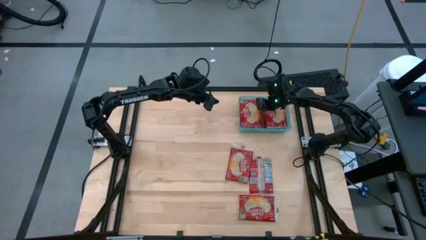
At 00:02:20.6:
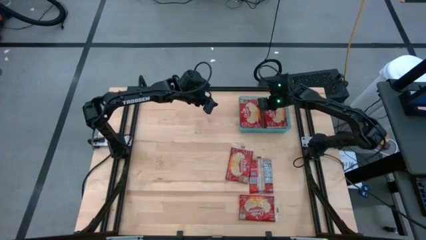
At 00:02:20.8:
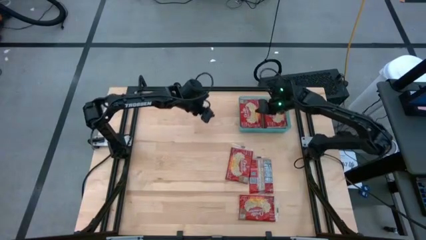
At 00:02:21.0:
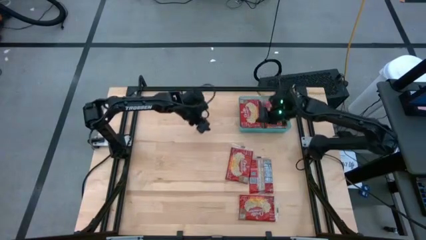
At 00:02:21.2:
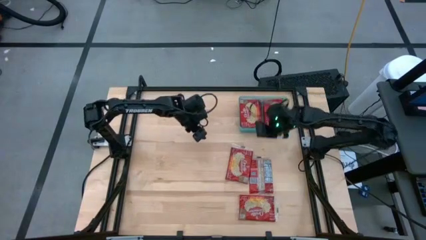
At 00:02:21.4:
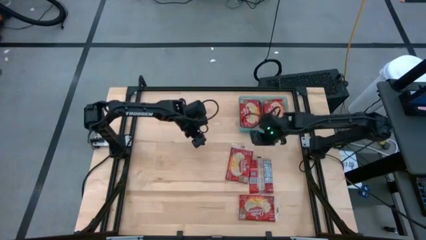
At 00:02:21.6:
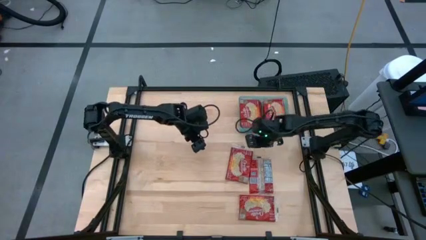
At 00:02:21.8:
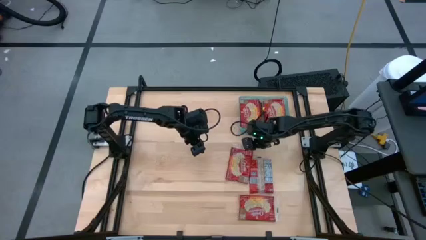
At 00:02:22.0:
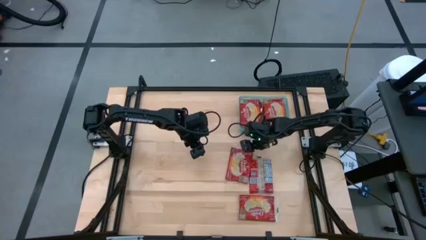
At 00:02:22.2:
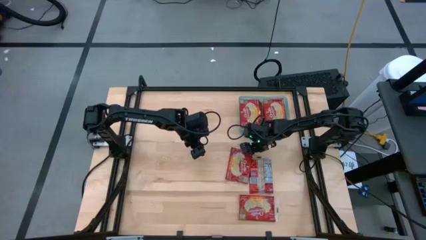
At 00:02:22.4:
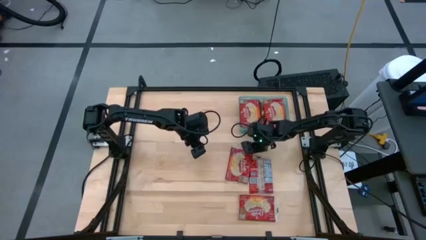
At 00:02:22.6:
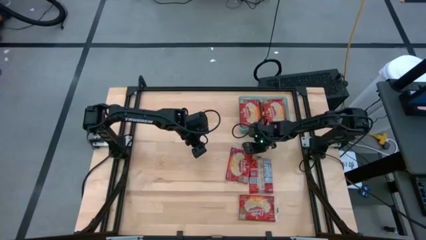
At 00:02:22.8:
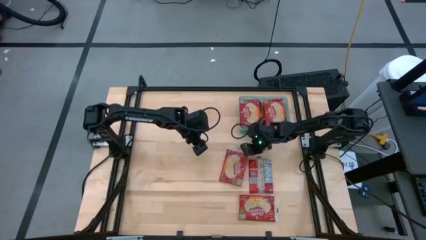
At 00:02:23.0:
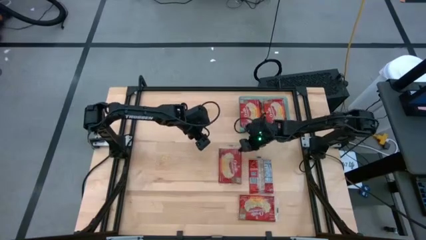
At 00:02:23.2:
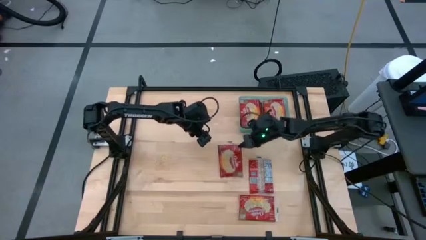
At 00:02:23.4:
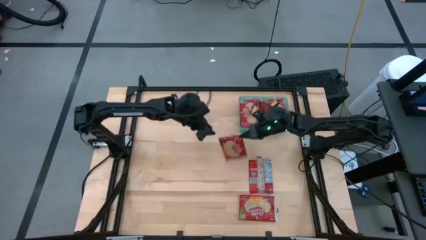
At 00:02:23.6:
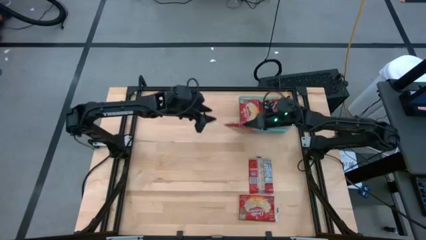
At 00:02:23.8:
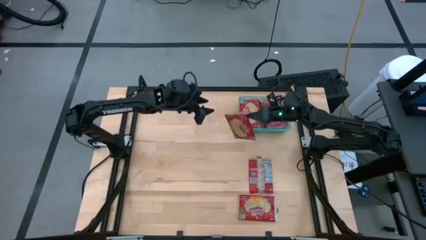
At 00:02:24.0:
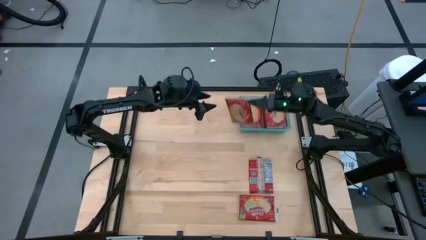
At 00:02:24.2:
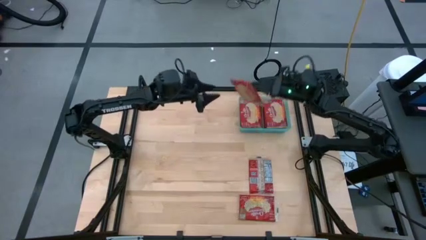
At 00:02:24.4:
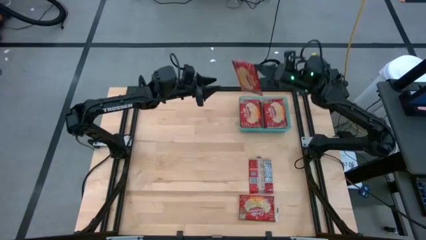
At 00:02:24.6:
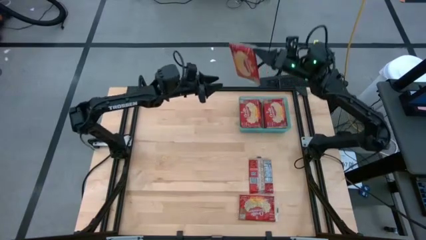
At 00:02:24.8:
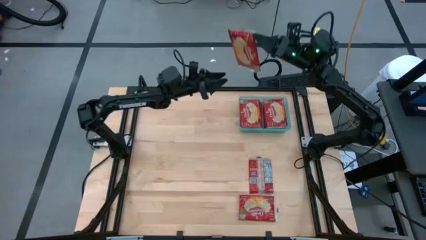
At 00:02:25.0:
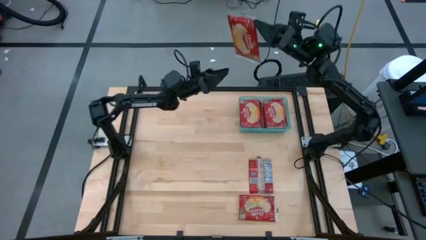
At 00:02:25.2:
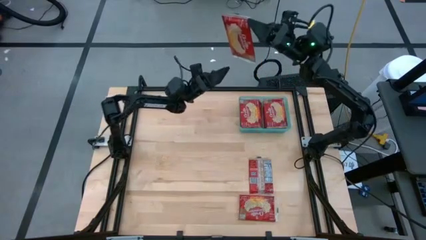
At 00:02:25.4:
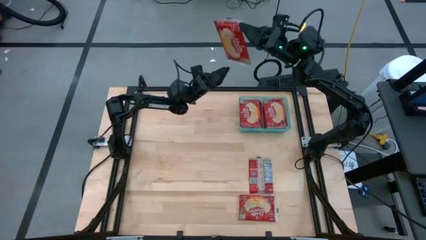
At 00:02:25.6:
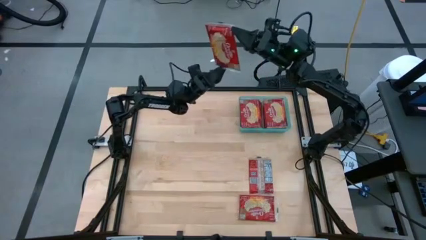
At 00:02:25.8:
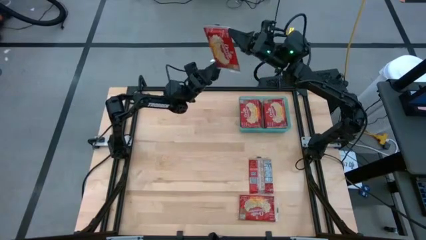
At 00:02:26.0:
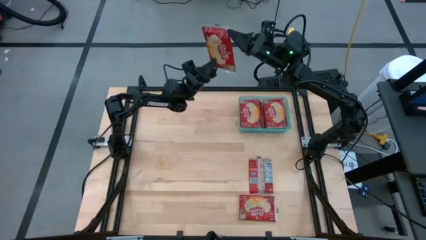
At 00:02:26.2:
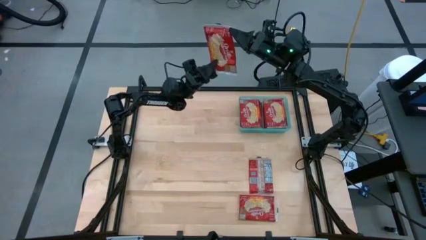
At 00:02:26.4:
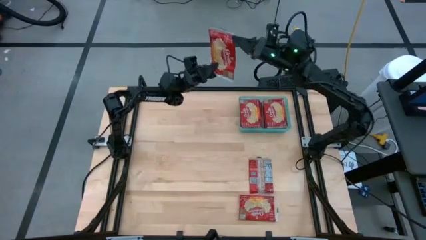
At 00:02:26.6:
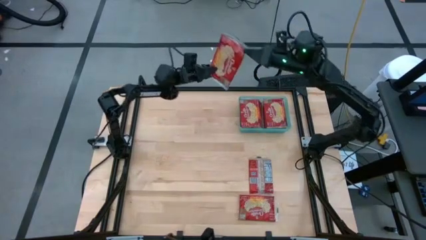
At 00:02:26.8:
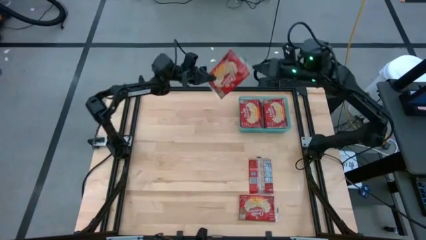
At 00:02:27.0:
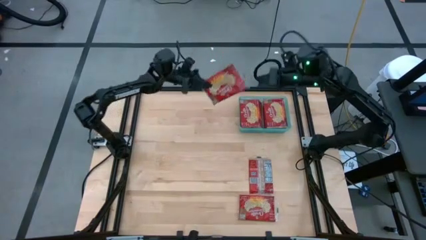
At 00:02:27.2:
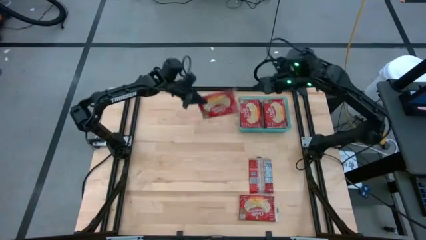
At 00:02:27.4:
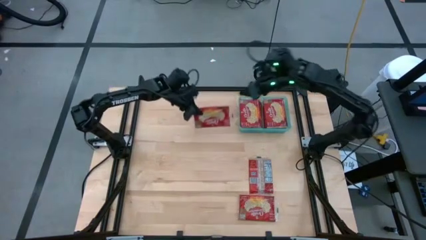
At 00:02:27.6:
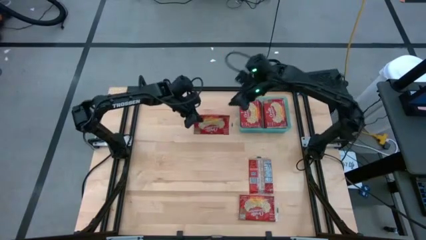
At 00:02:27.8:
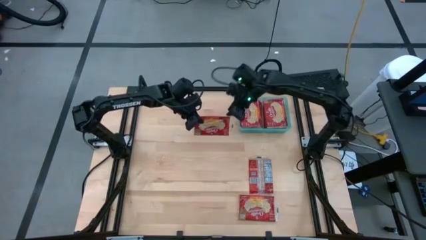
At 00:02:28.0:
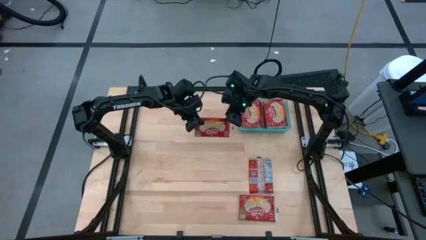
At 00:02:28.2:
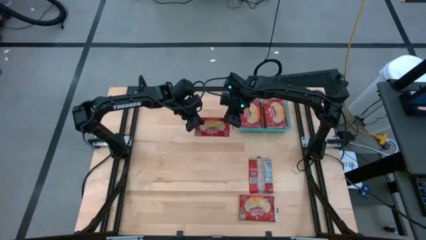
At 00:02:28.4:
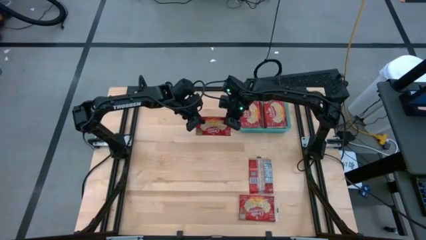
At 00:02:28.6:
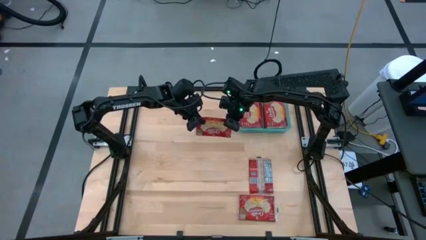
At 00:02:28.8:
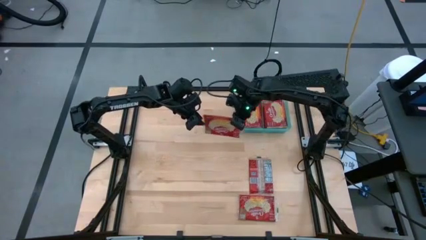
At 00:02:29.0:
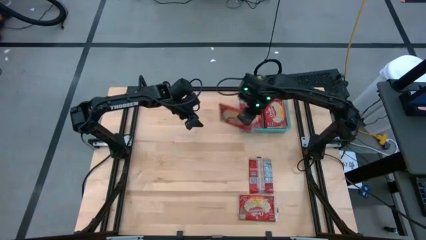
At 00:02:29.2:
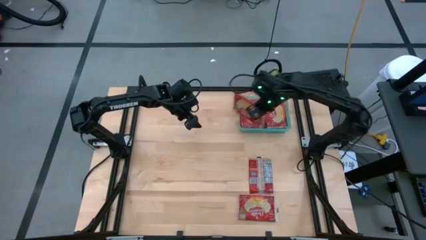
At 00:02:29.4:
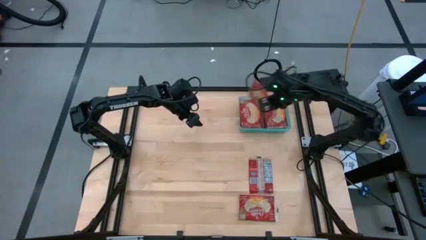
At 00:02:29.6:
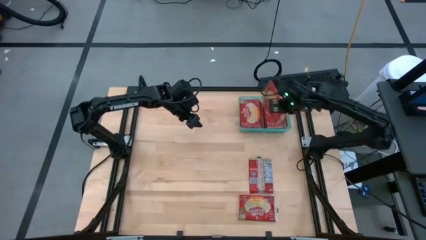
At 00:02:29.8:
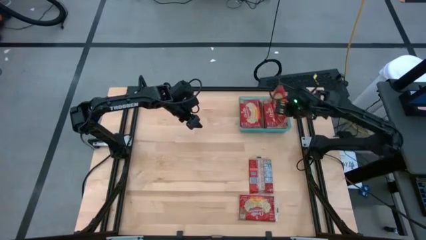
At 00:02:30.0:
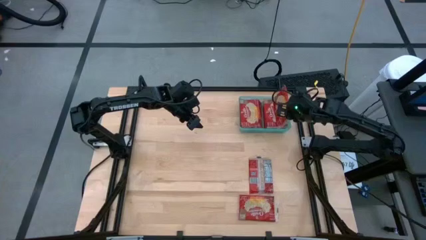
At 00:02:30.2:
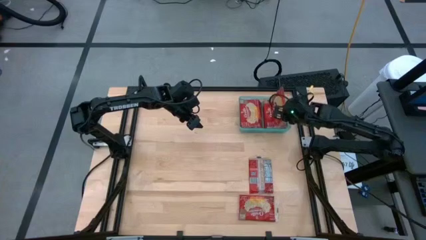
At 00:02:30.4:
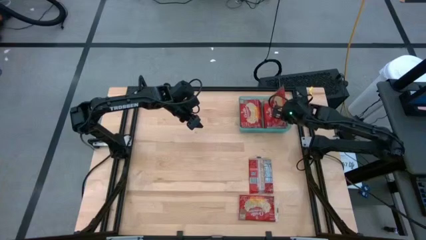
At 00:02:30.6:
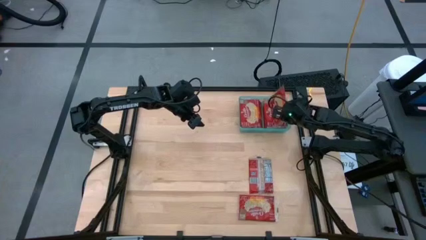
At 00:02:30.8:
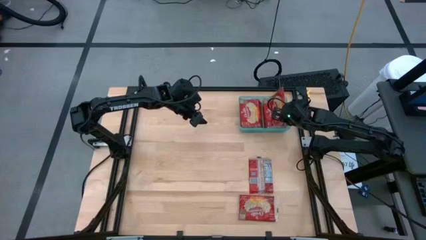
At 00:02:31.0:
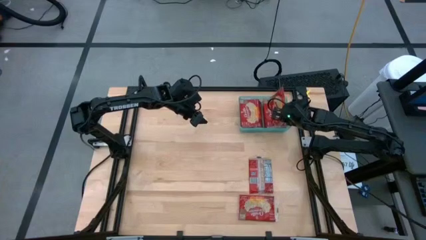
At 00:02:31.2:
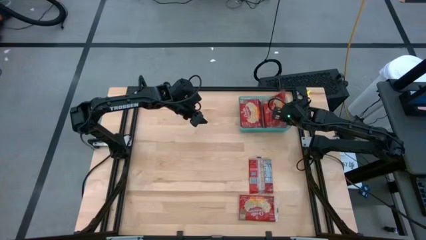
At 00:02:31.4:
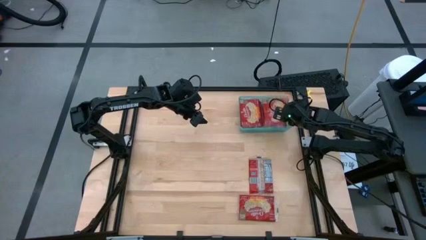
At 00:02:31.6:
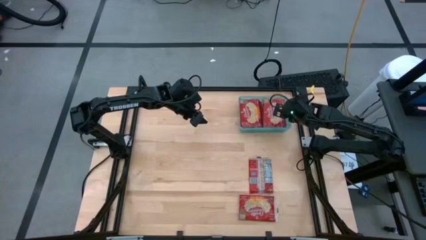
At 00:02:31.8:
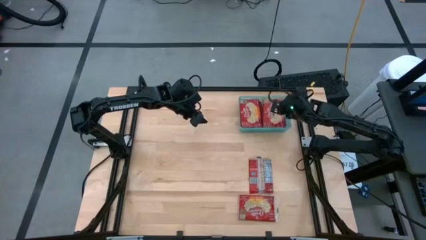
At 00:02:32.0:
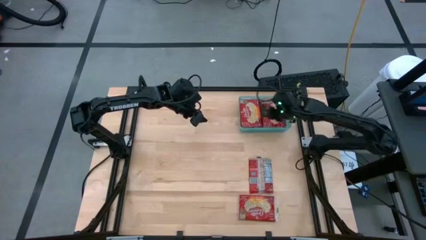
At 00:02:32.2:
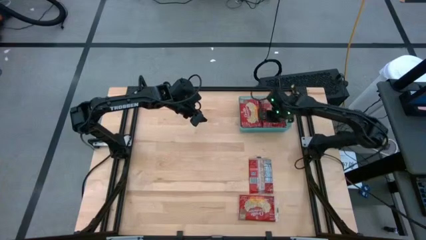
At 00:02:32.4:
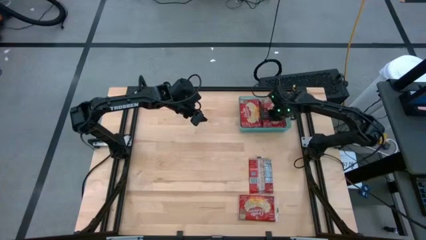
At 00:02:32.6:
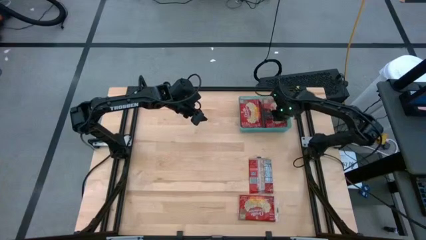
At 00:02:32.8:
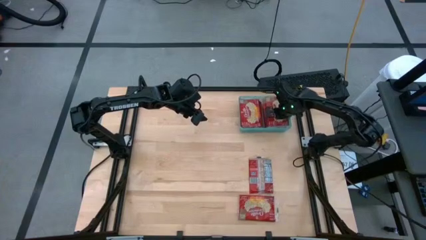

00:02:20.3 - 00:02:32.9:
Task: Sort popcorn bags into baskets
Put the red popcorn bag into the light blue bin
